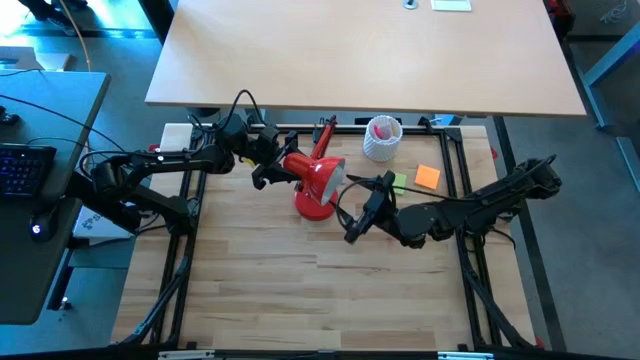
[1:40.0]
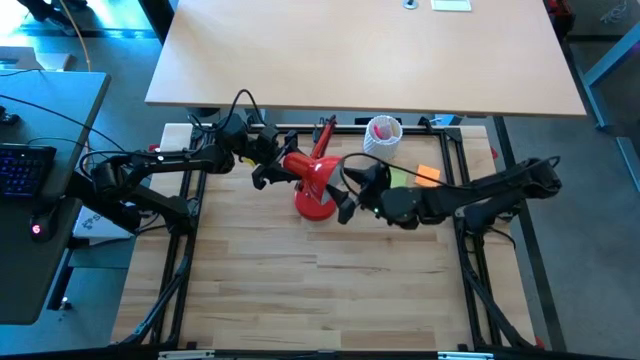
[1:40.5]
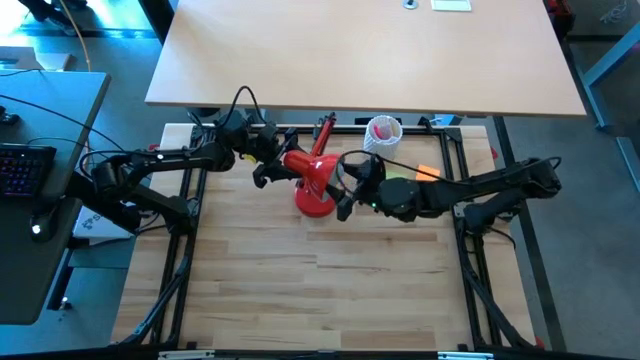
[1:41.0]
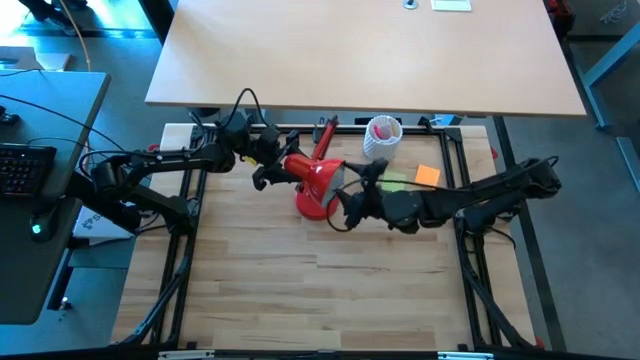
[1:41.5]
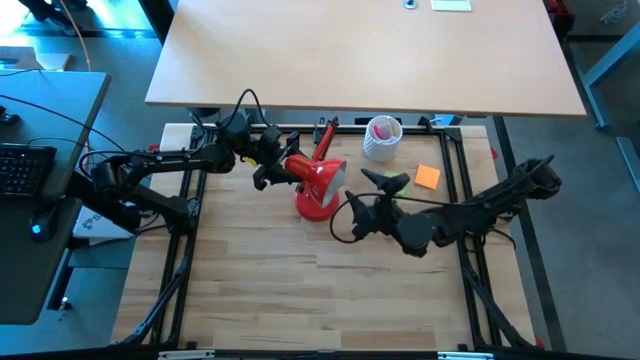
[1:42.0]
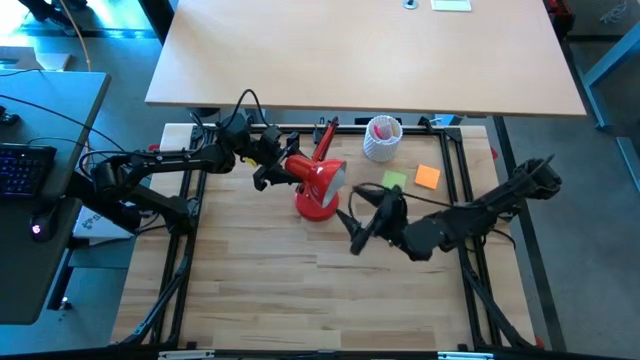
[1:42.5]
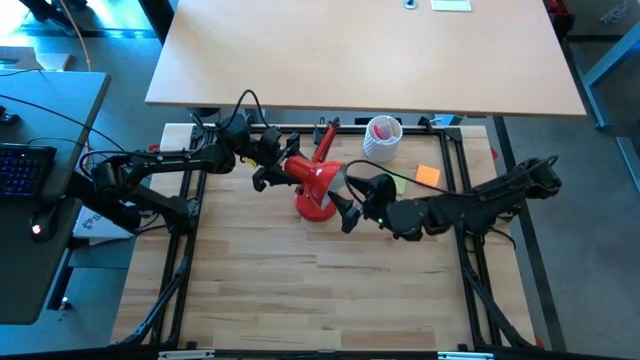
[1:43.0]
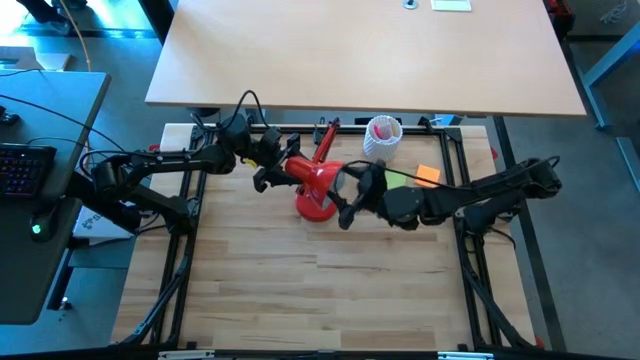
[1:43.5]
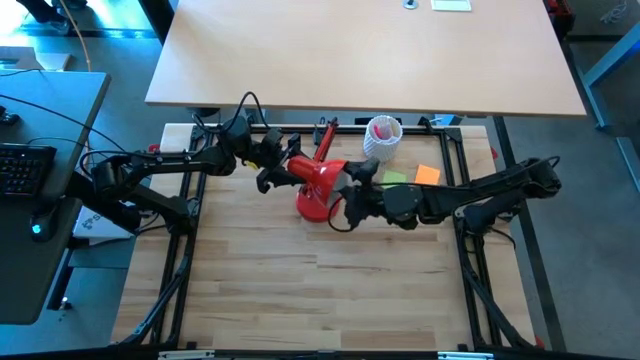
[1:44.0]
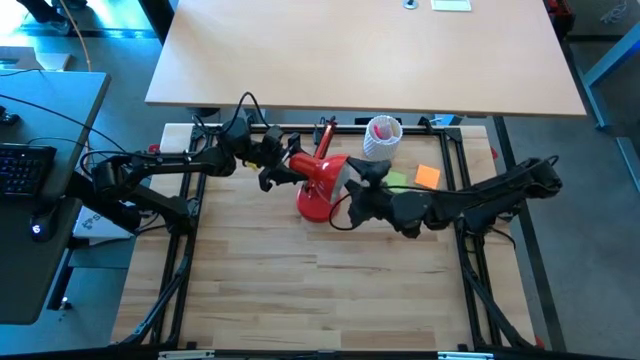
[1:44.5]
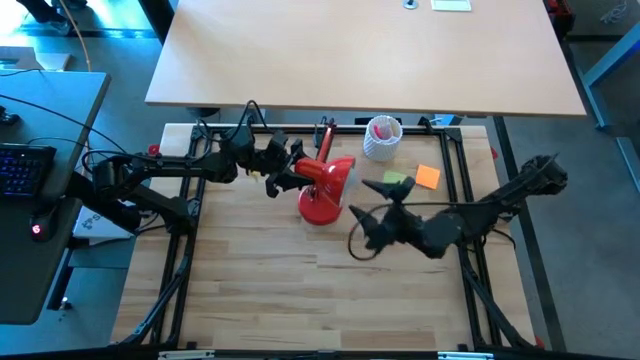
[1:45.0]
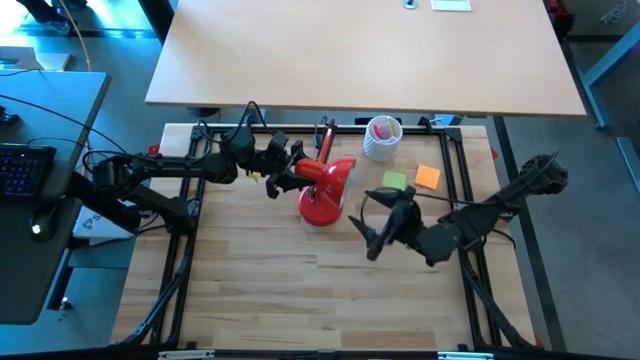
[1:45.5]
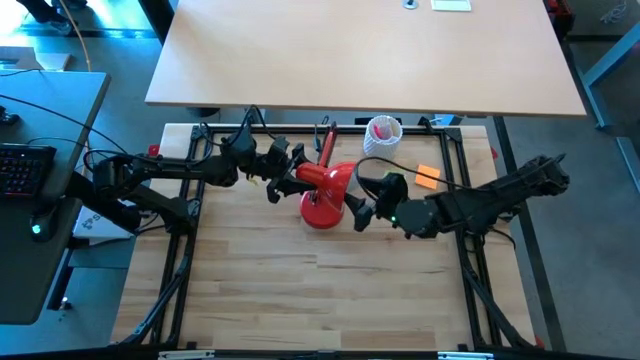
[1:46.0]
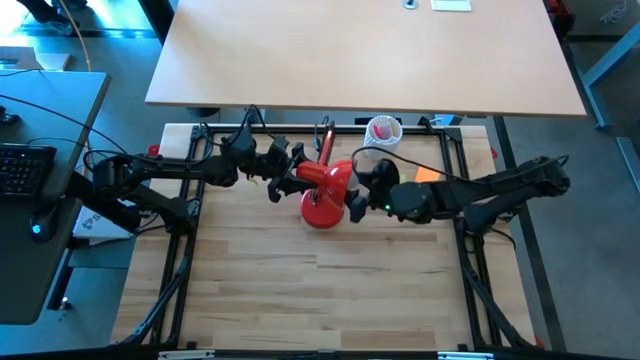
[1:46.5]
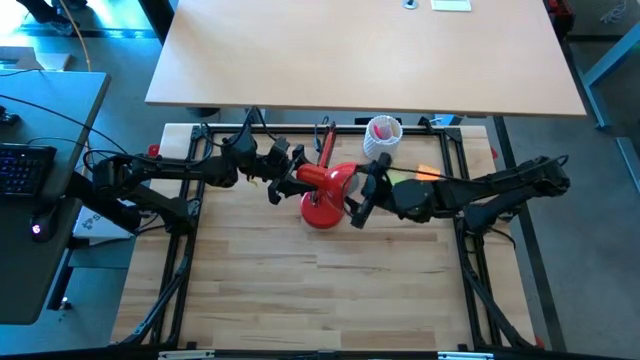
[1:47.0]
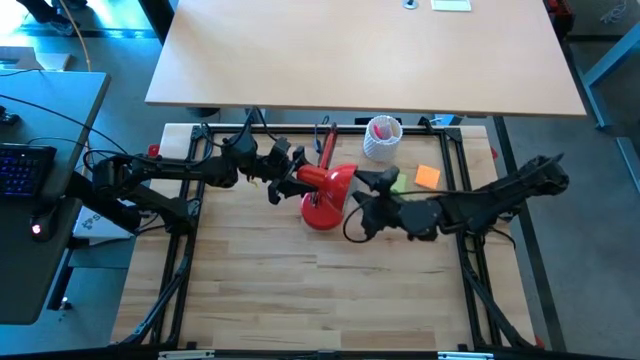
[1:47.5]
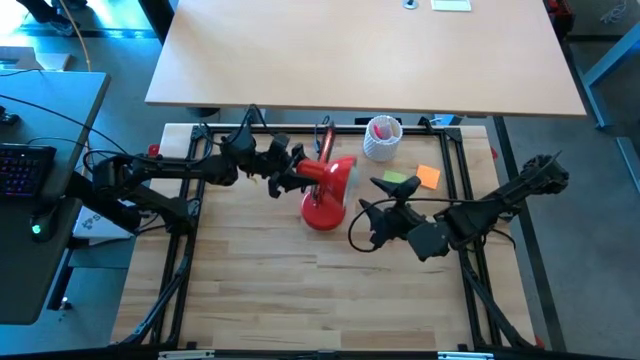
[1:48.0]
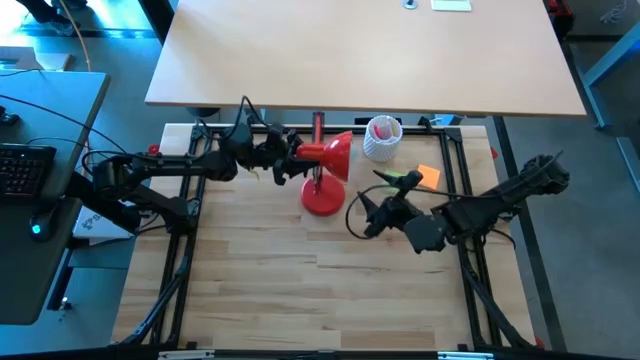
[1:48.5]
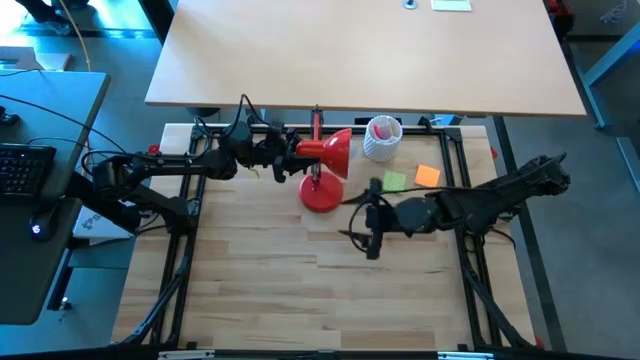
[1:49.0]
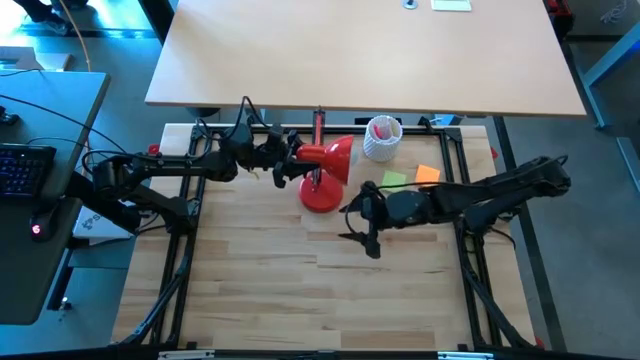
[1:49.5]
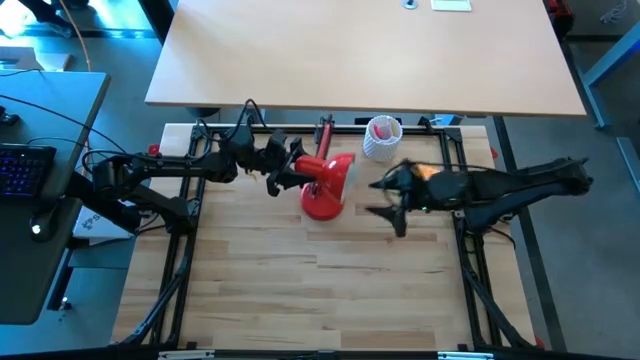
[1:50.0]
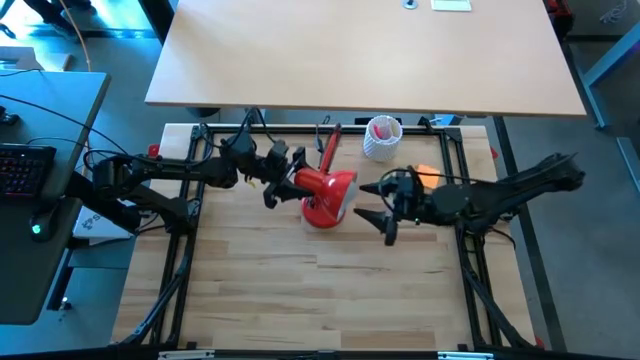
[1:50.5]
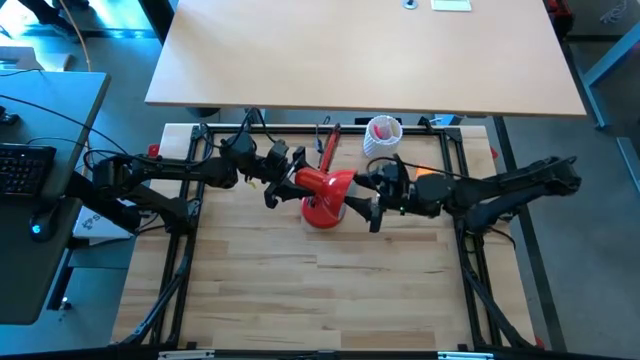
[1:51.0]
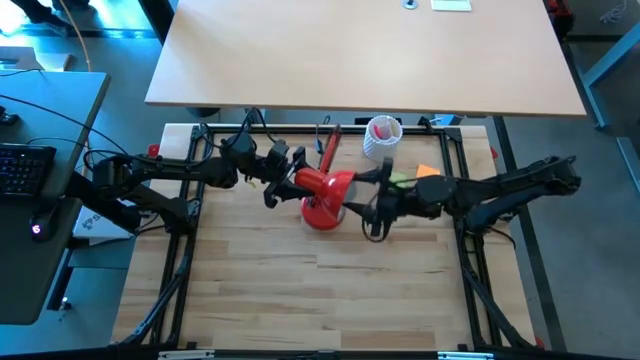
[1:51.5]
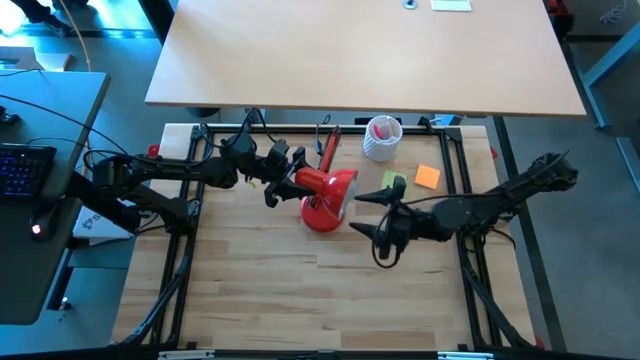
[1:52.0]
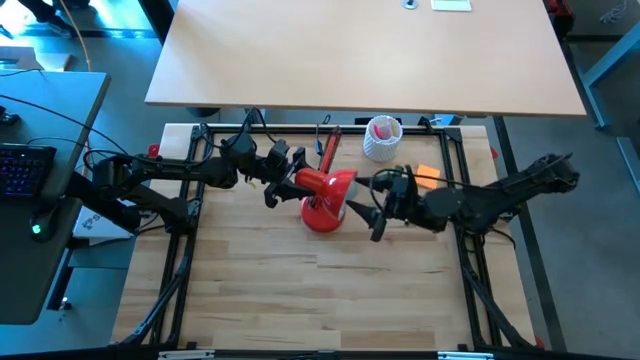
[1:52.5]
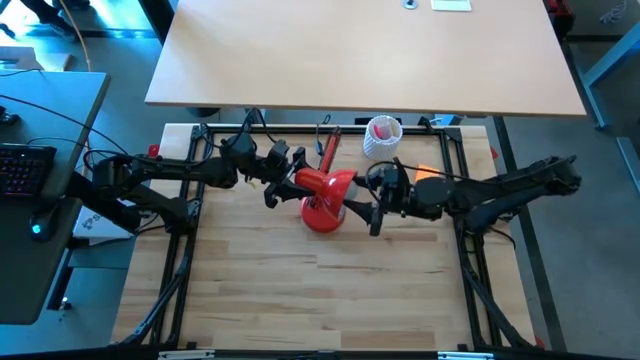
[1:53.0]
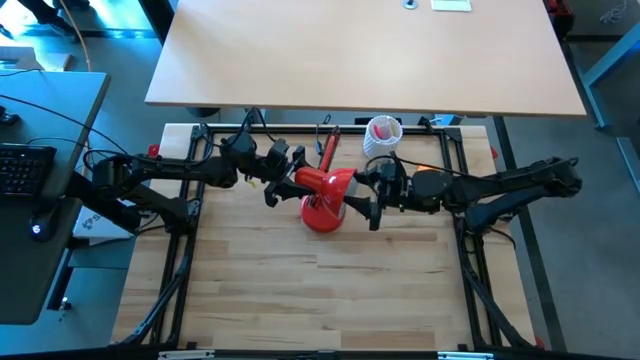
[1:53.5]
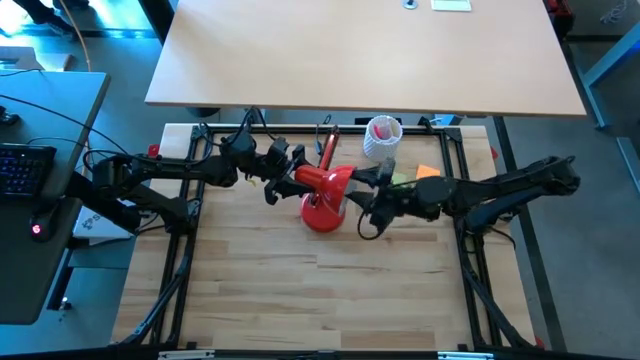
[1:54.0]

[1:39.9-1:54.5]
Task: Screw lightbulb
Remove the white lightbulb from the red lamp

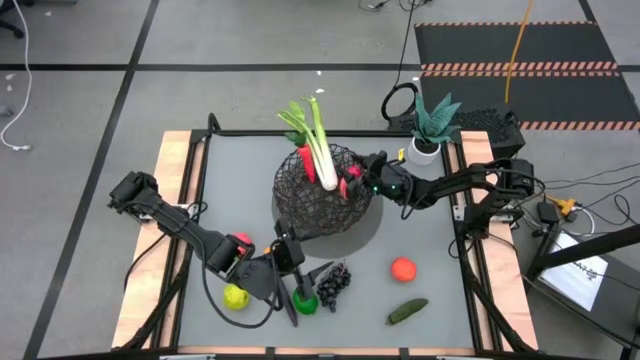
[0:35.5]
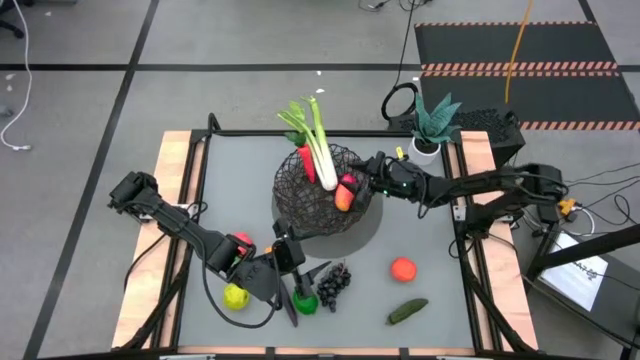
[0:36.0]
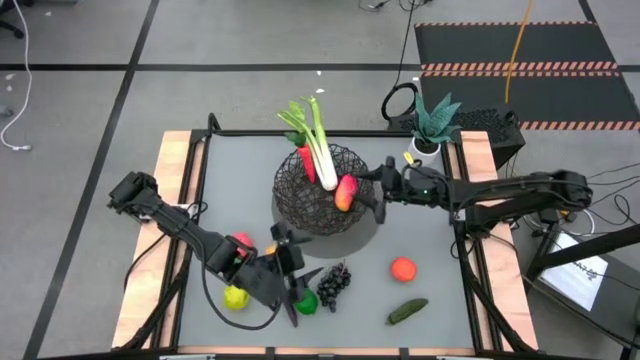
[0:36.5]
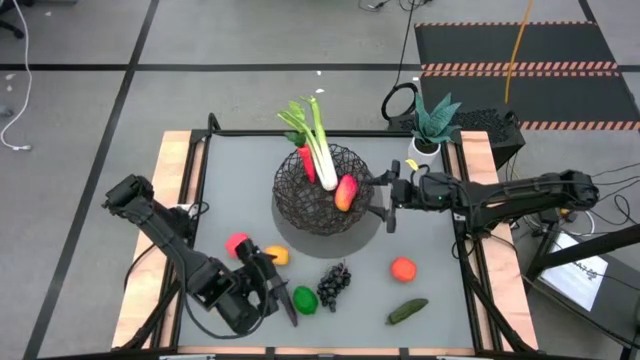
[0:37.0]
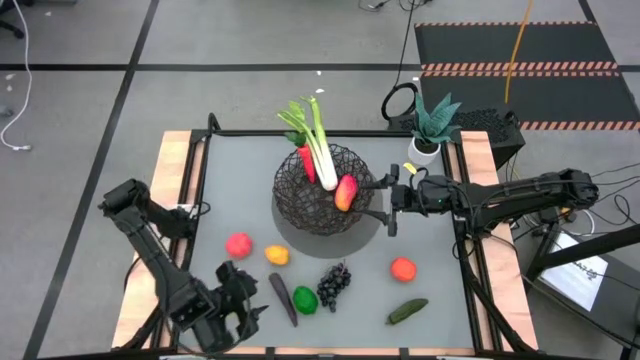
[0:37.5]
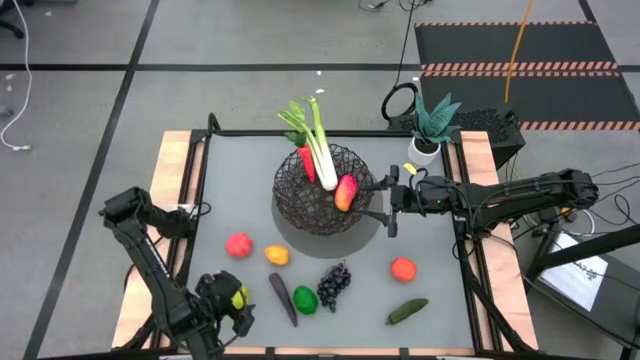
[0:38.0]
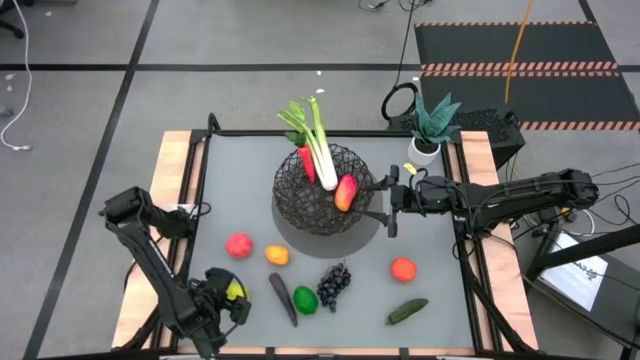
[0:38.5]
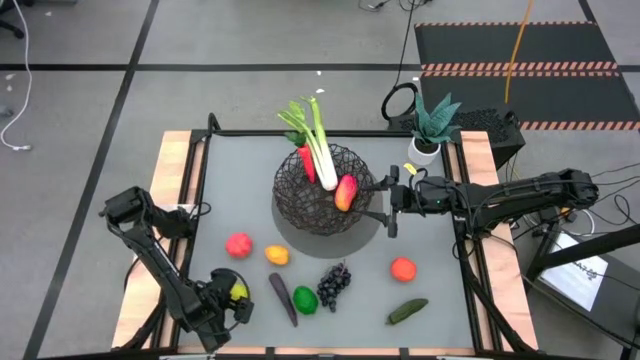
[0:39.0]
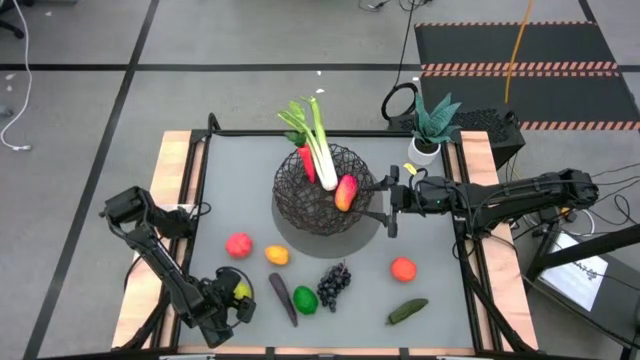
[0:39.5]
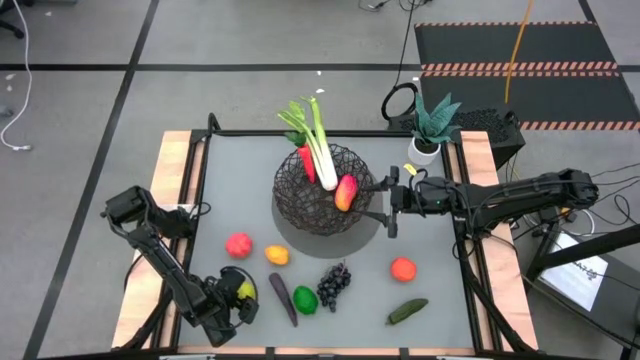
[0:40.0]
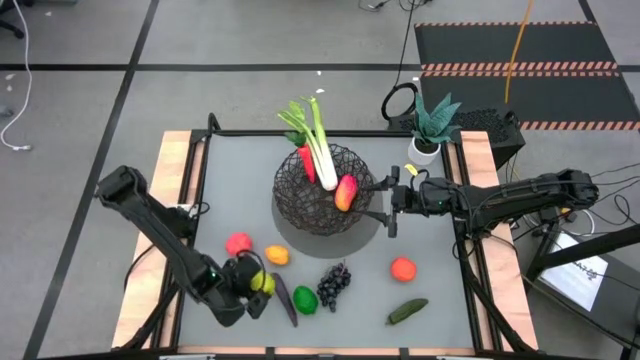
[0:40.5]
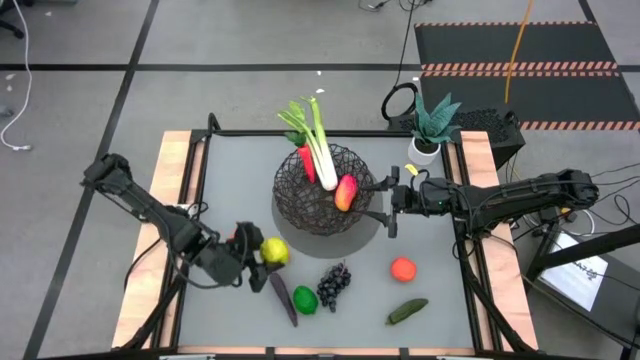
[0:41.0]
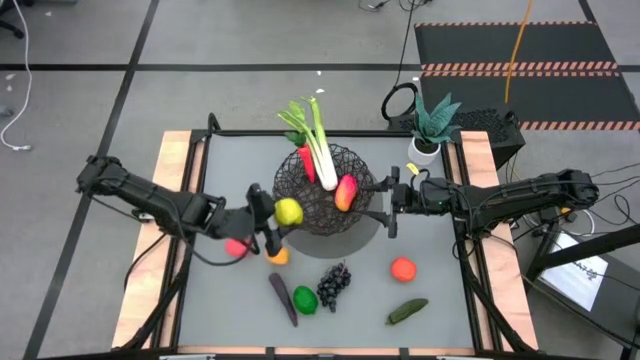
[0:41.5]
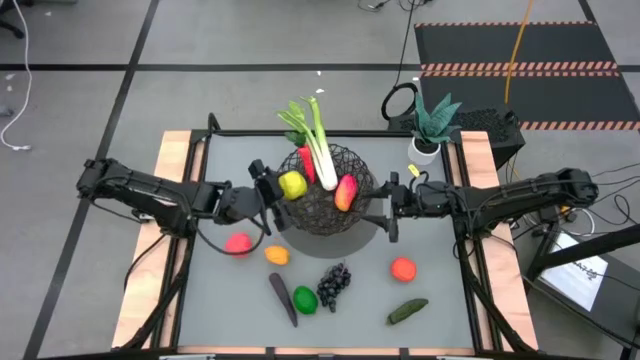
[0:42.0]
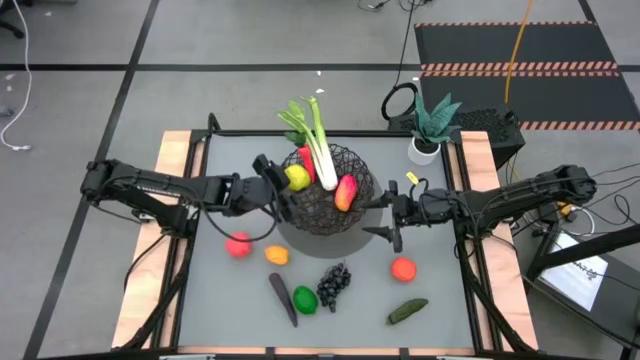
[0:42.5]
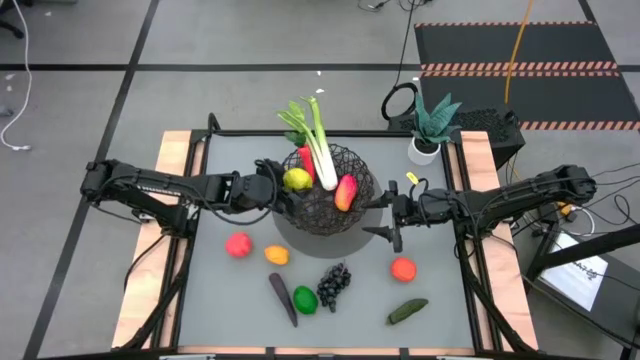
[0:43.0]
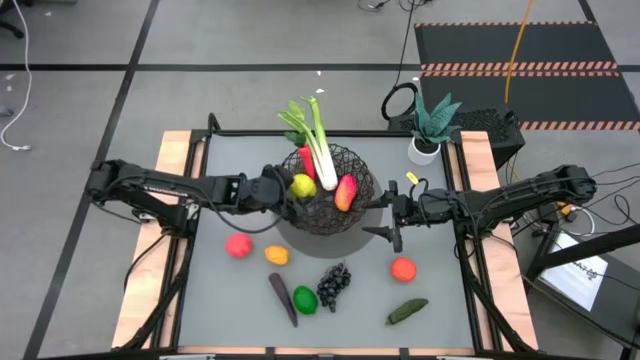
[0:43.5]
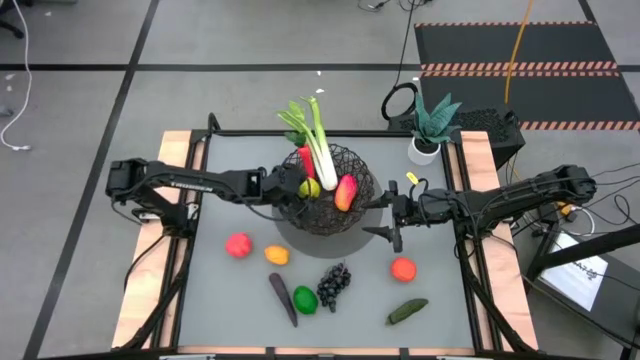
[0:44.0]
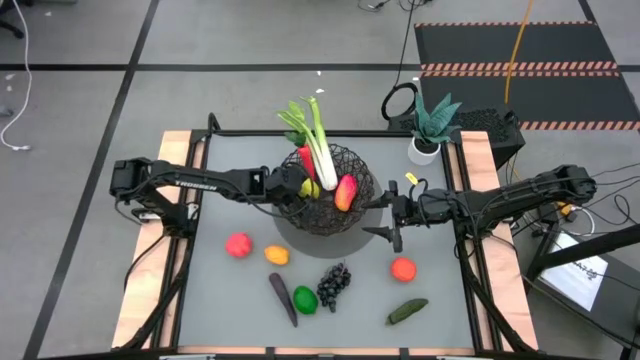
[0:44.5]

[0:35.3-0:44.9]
Task: Build produce basket
Put the green apple into the black woven basket
